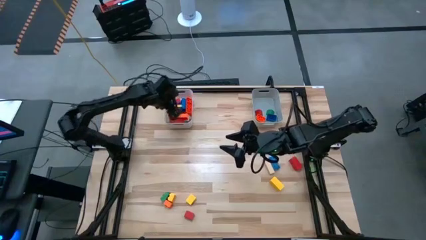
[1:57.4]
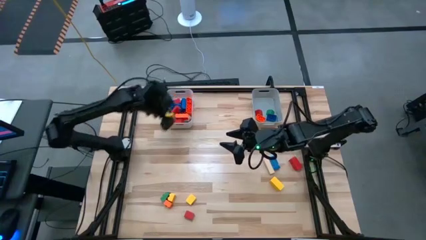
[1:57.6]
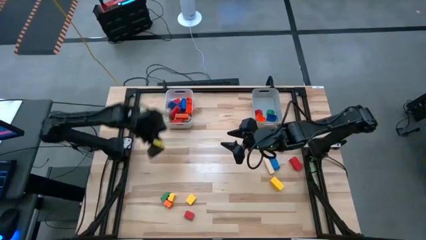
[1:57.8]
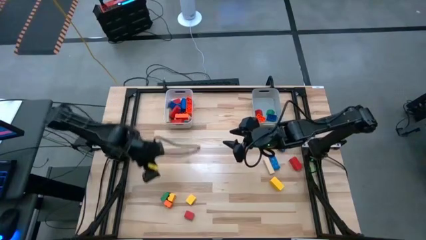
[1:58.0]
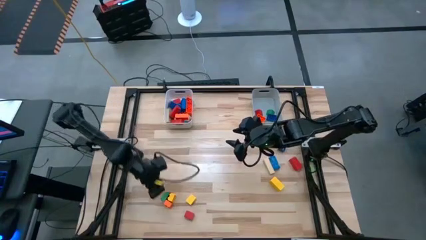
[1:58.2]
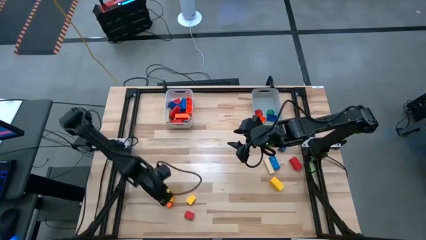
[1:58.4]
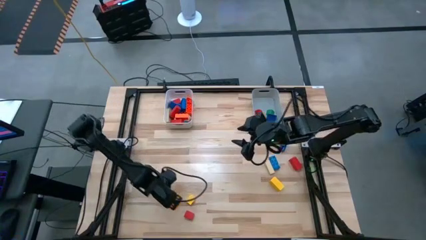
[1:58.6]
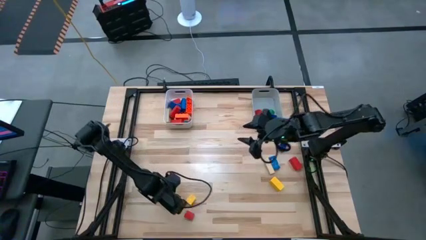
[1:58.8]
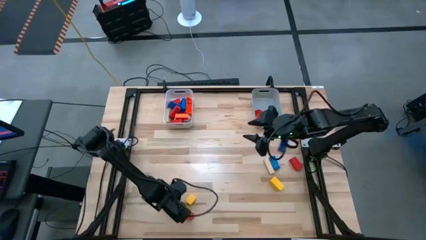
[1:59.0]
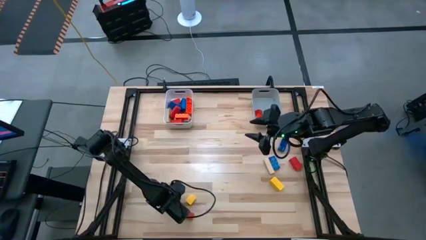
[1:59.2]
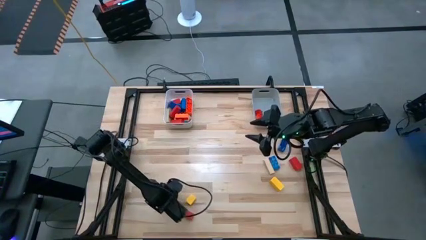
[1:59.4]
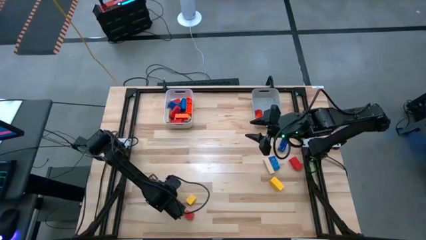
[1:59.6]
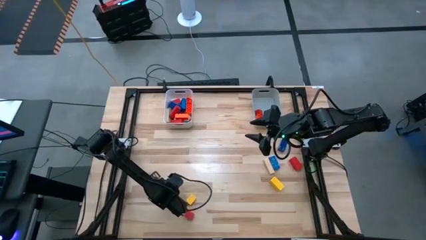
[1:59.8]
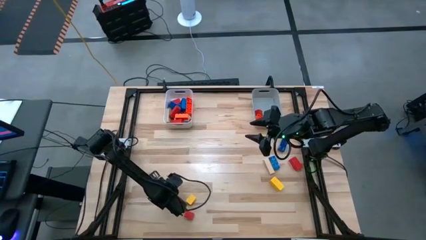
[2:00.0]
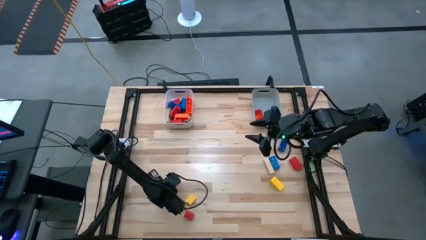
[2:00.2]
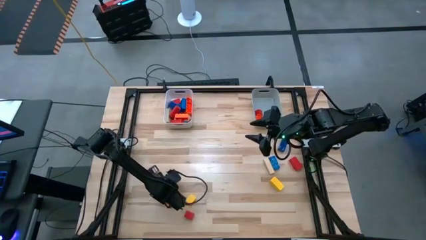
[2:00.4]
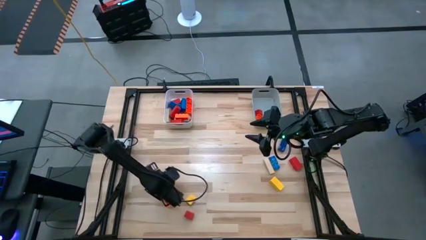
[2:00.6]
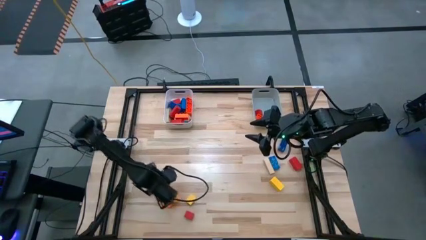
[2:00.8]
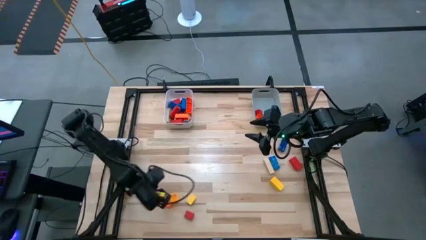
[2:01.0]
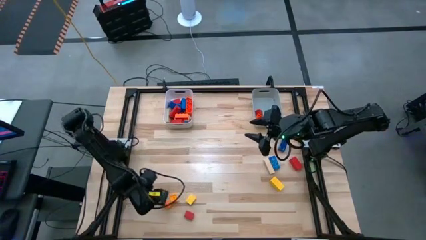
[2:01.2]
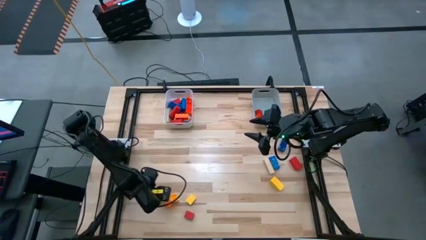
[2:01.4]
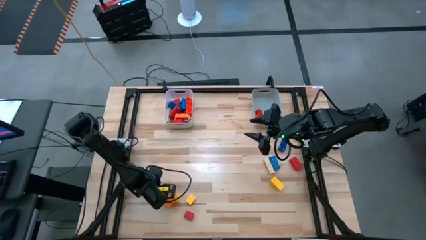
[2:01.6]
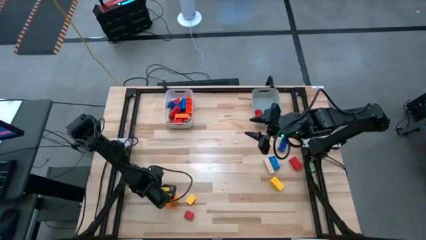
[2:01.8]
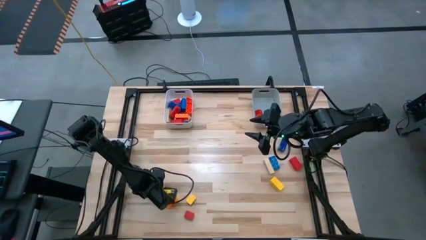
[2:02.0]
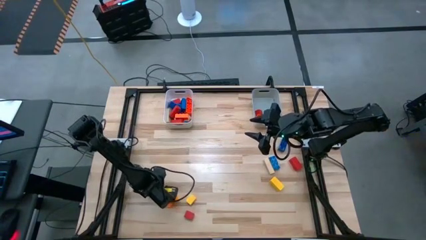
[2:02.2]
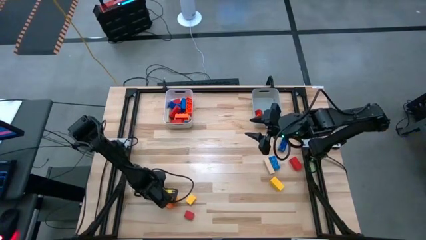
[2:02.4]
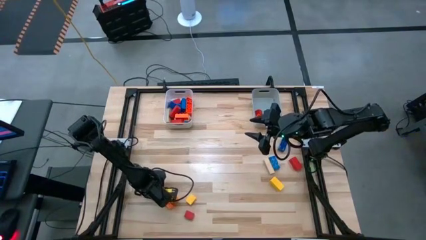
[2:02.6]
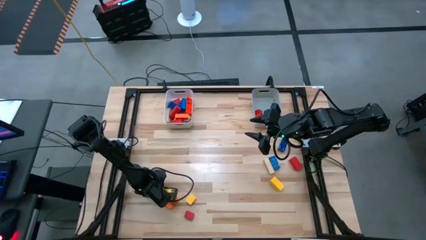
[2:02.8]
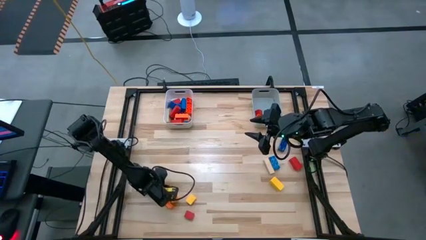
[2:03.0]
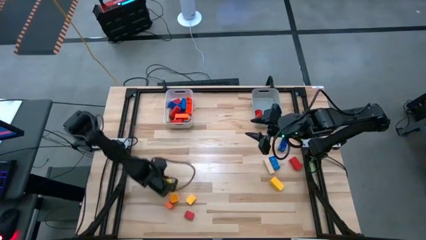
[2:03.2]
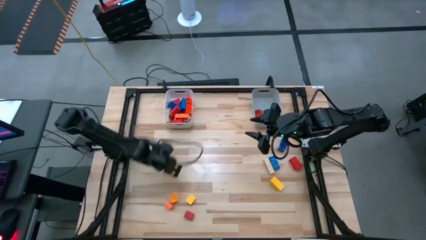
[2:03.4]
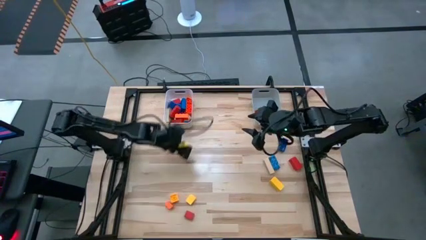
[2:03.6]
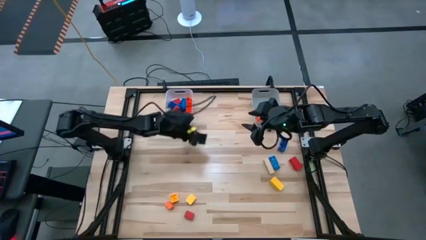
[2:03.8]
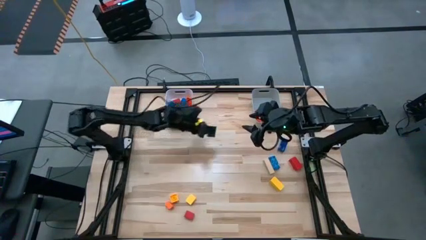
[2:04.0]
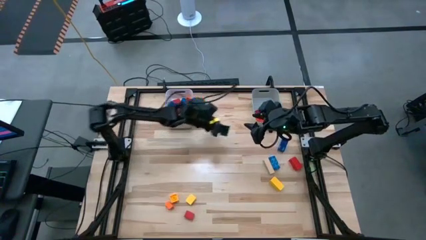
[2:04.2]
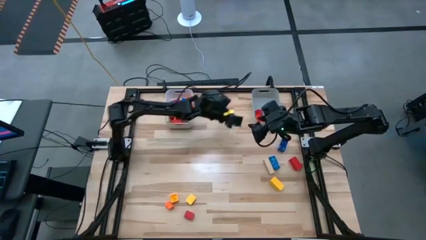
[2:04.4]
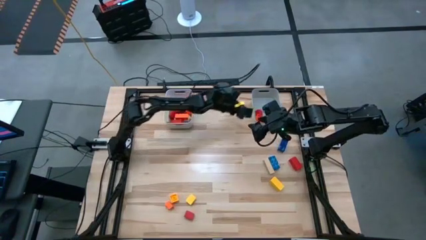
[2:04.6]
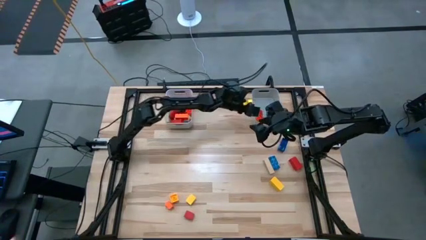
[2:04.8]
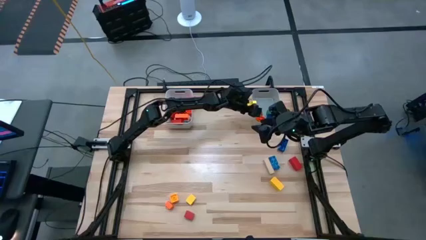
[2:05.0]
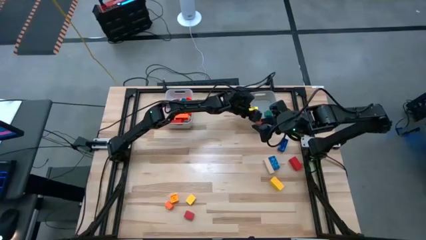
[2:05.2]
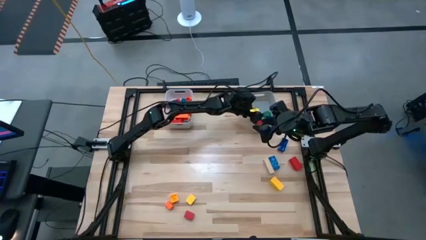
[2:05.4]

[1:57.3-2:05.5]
Task: Sort blocks by size
Put the green cuboid game piece into the white bin

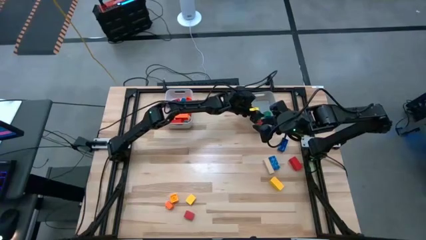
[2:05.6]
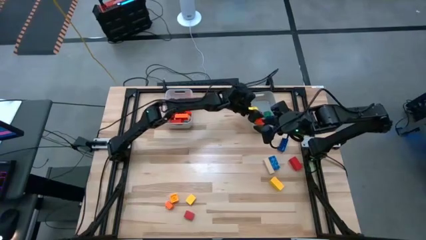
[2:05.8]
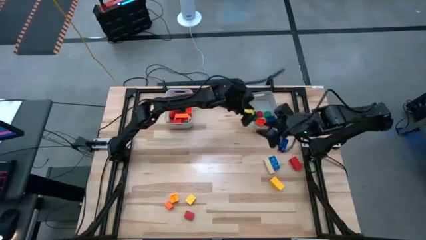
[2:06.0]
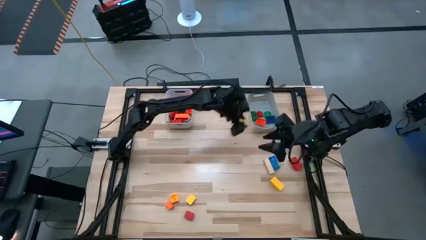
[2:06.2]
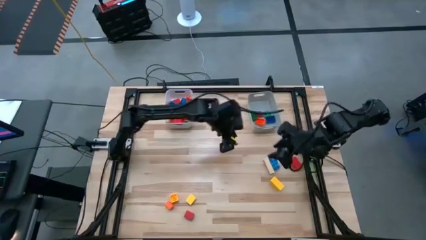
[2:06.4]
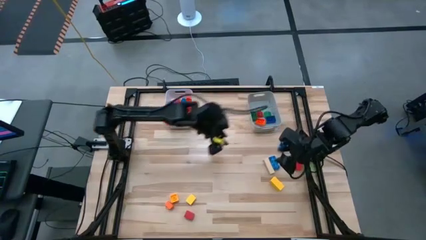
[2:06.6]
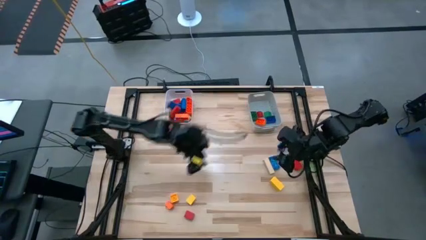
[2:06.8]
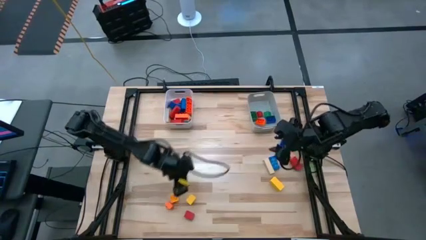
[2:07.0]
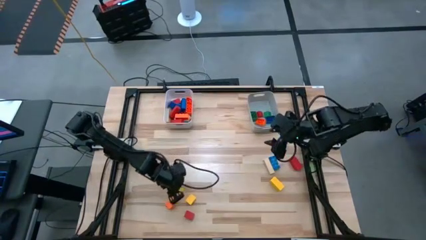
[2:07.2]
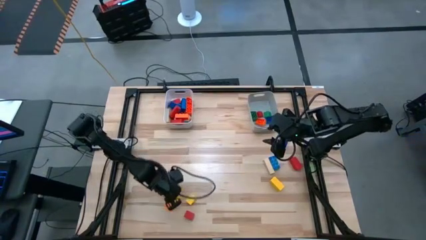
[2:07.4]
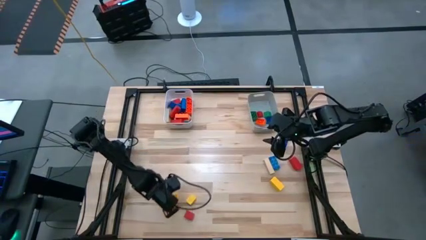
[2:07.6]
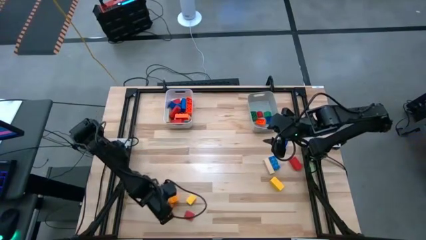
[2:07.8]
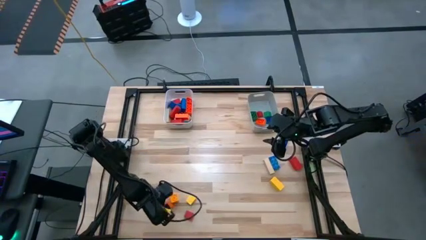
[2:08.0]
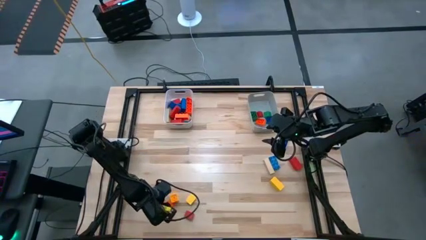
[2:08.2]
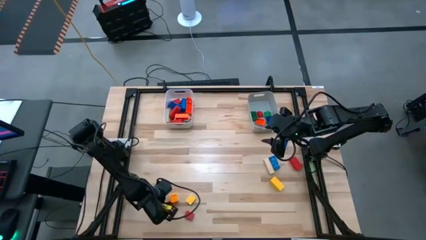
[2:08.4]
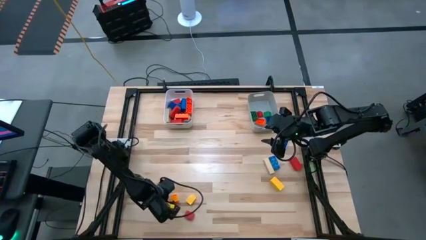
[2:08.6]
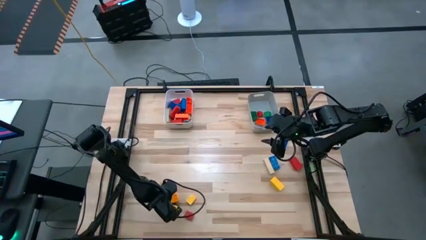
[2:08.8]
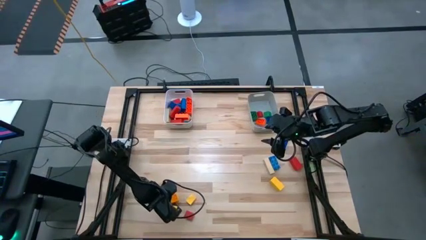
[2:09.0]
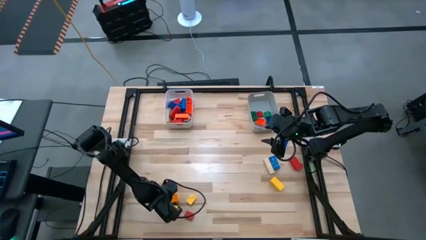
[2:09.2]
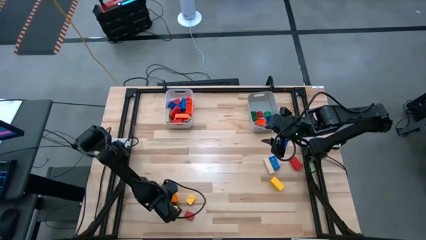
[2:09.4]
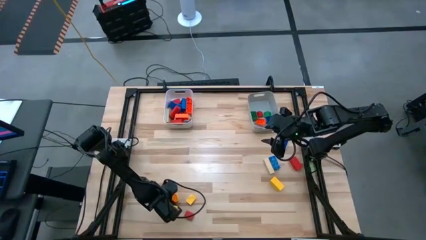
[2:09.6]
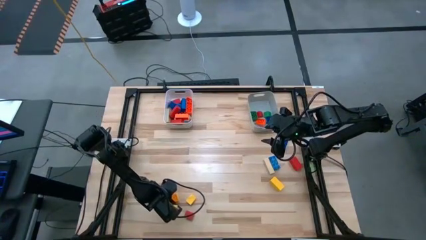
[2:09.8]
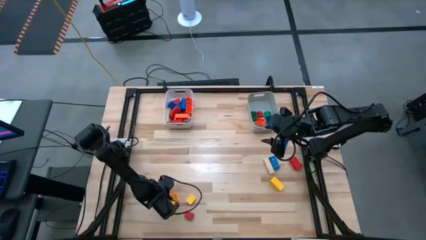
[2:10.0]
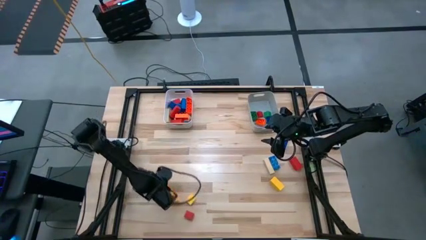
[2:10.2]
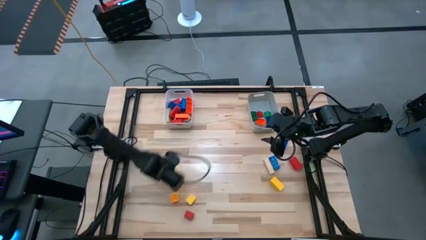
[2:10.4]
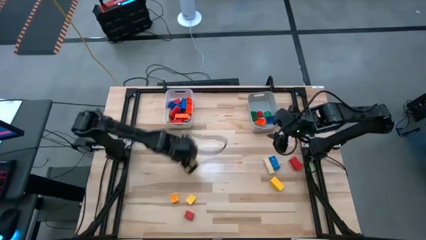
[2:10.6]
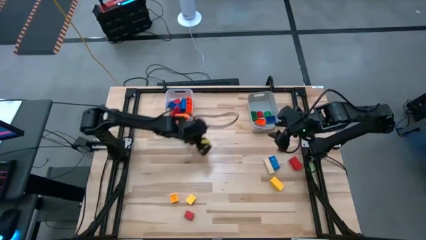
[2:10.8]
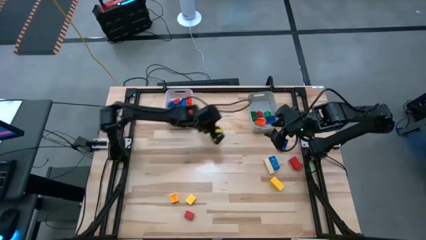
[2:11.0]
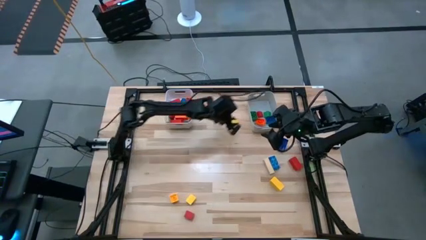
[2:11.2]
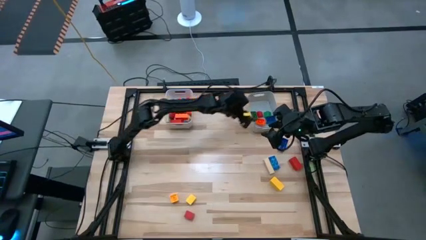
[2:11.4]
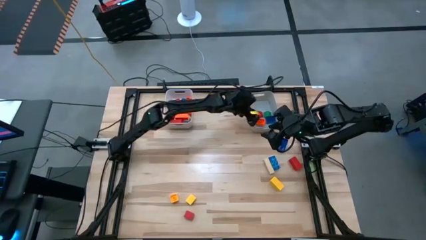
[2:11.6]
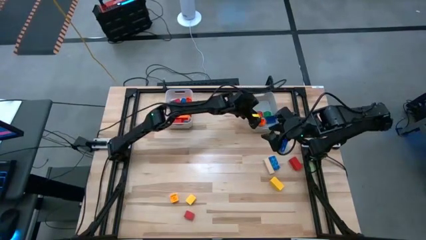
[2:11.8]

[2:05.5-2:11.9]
Put the orange square game piece into the gray bin

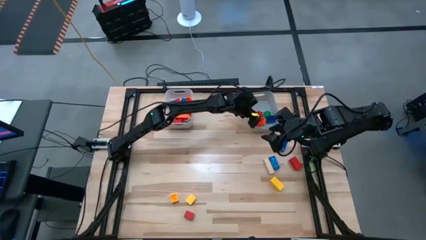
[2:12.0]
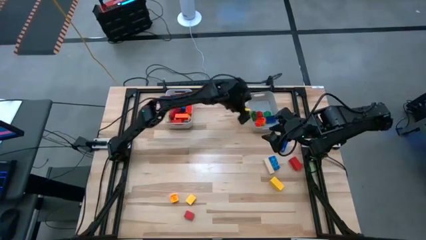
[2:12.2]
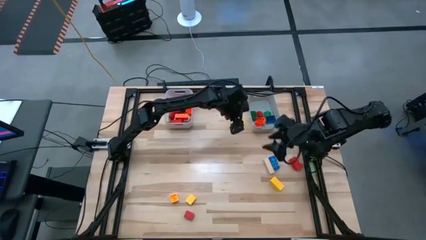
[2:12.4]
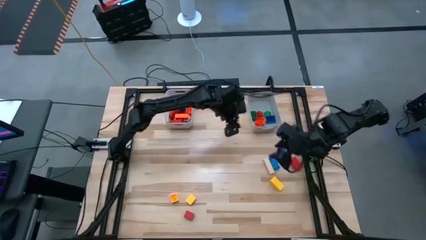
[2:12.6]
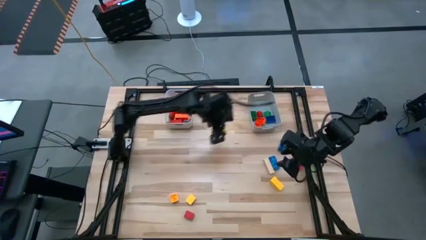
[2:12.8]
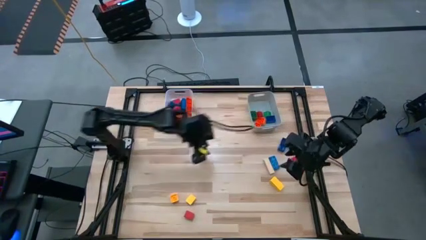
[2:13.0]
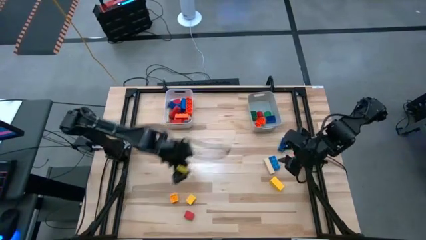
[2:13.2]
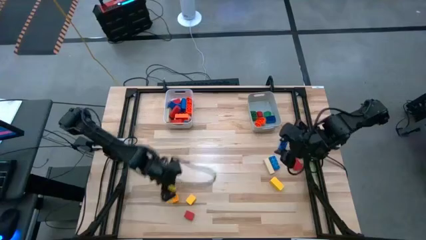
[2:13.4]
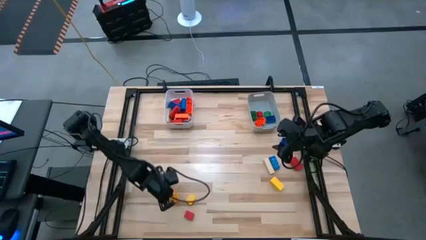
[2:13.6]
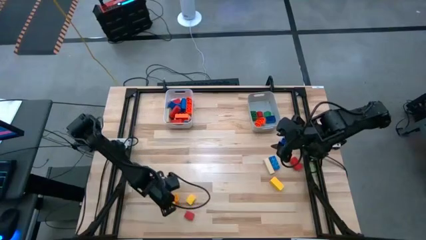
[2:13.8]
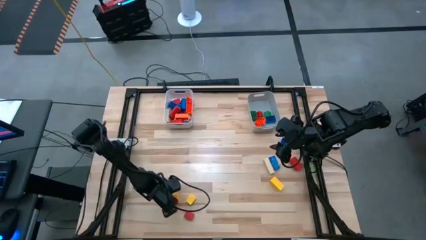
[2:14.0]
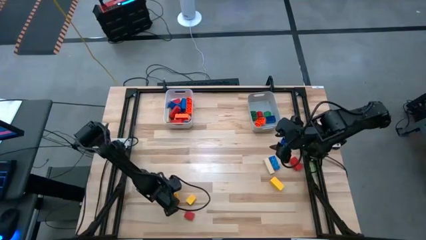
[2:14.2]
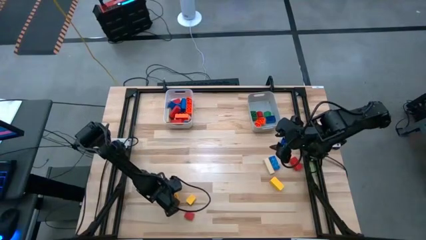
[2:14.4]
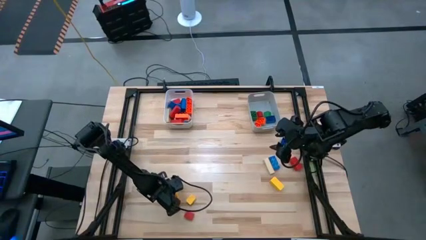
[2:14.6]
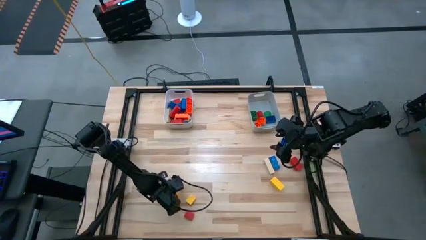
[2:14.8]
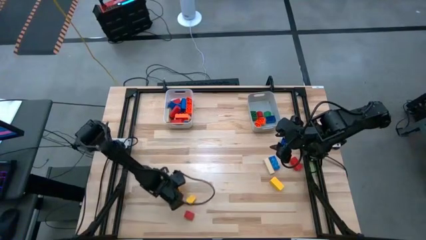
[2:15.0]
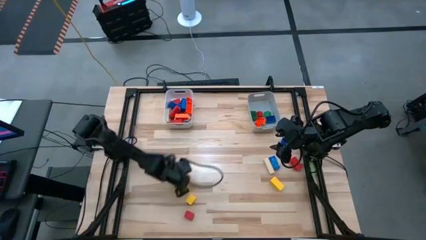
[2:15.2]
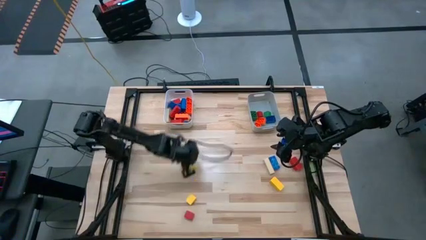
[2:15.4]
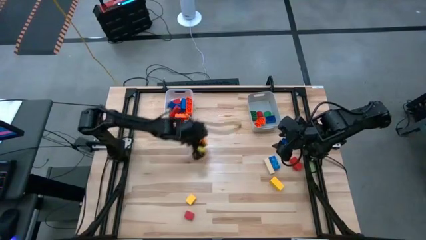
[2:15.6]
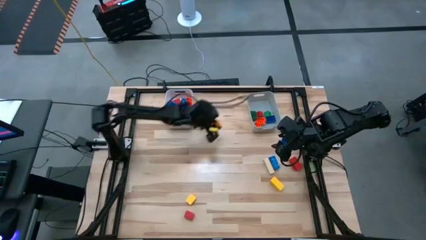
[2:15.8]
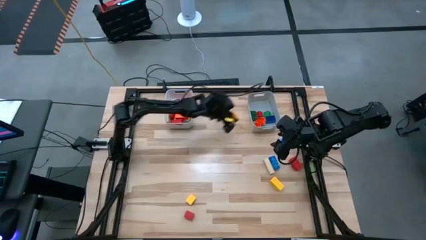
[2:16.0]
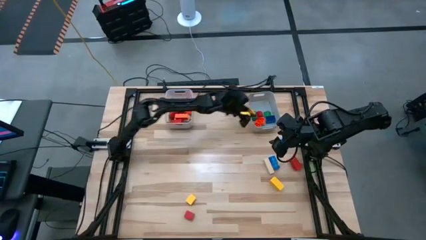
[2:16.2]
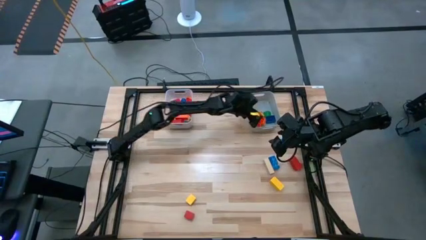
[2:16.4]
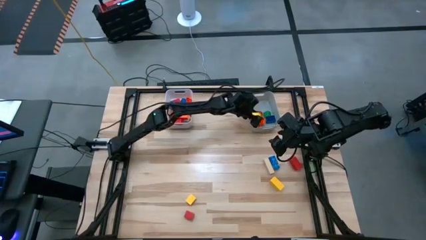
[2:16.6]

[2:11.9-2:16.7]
Put the yellow square game piece into the gray bin
